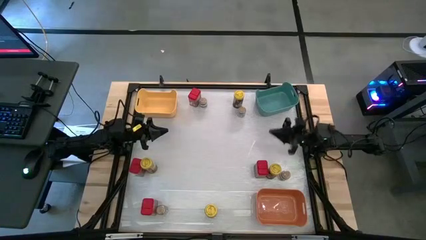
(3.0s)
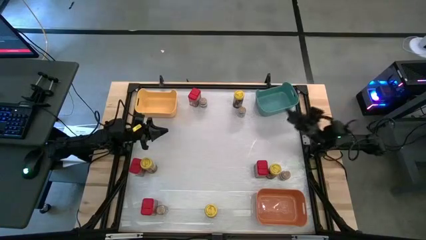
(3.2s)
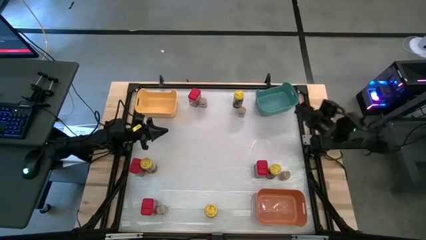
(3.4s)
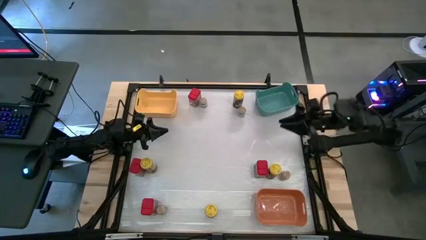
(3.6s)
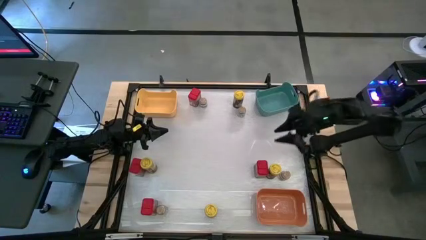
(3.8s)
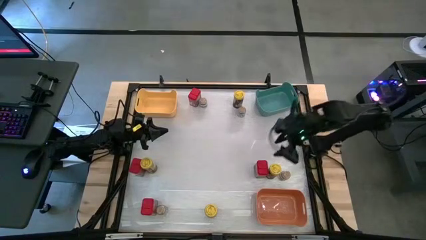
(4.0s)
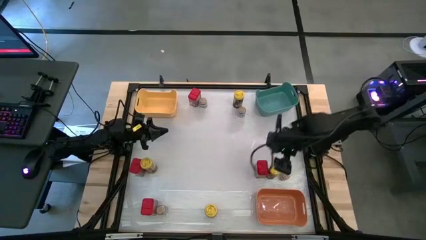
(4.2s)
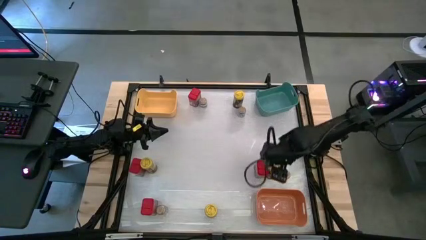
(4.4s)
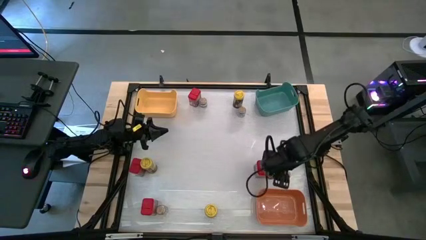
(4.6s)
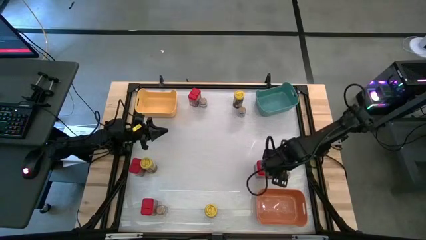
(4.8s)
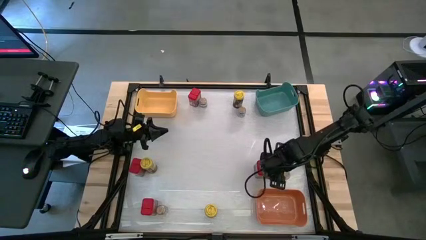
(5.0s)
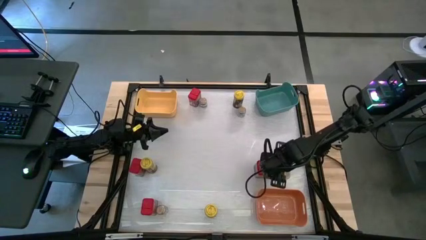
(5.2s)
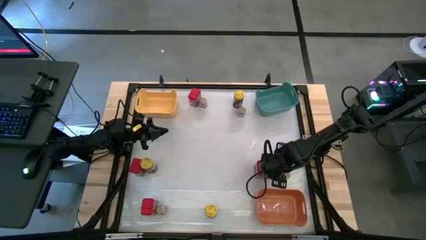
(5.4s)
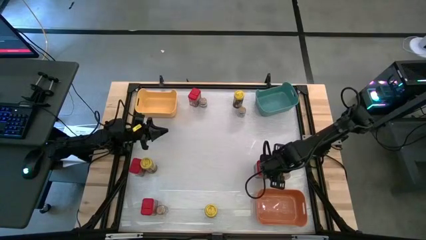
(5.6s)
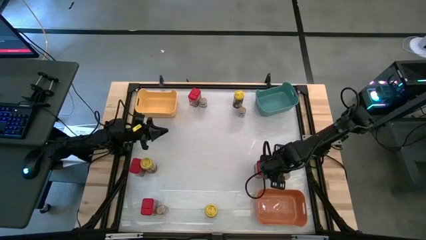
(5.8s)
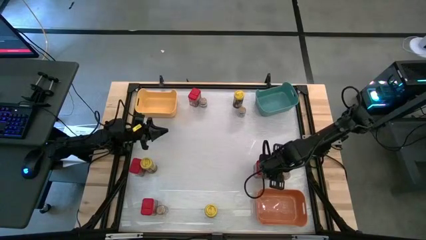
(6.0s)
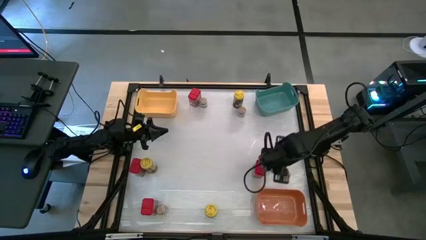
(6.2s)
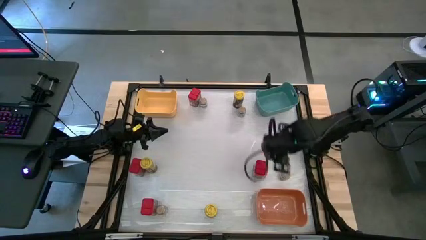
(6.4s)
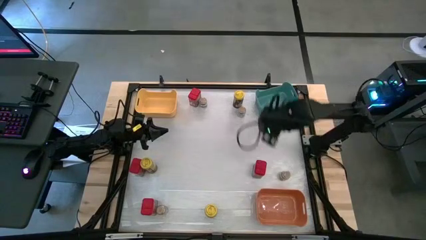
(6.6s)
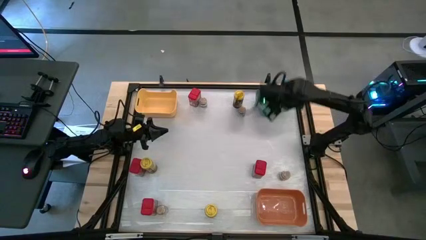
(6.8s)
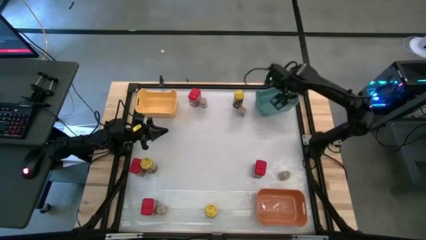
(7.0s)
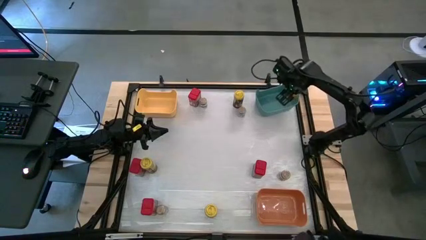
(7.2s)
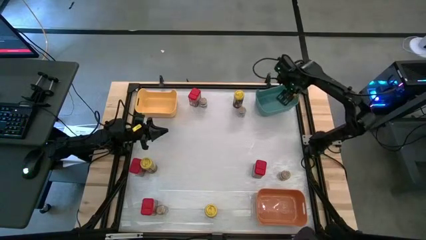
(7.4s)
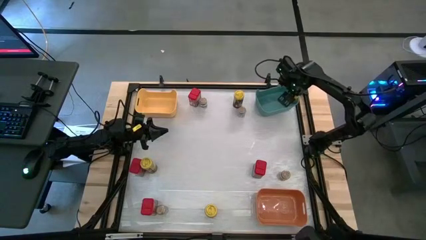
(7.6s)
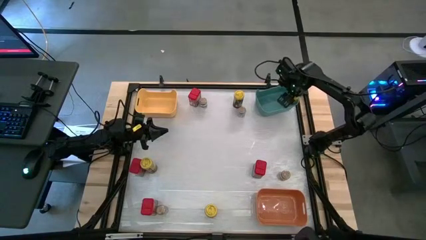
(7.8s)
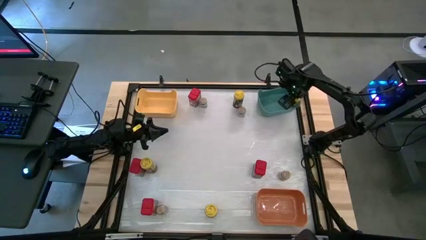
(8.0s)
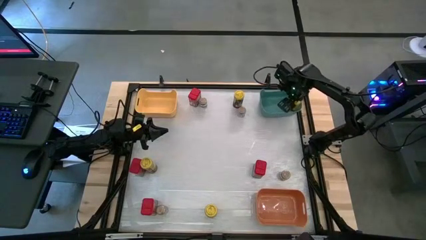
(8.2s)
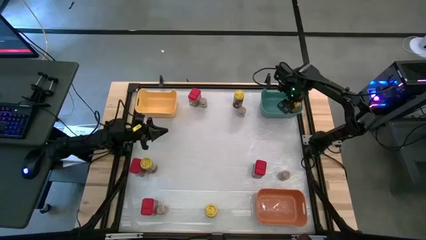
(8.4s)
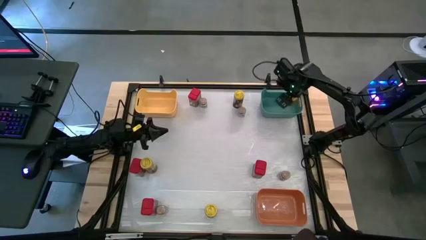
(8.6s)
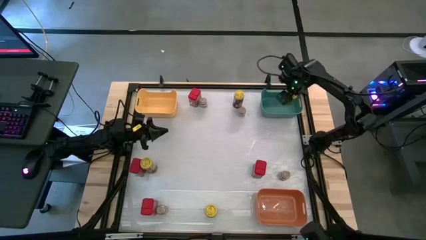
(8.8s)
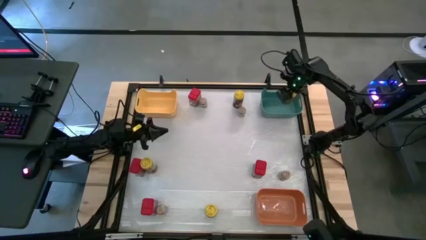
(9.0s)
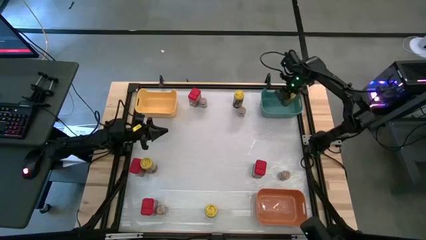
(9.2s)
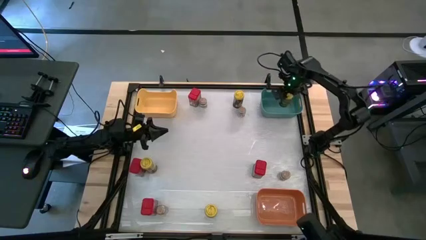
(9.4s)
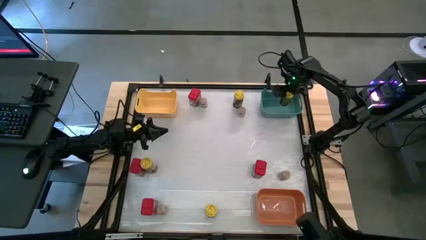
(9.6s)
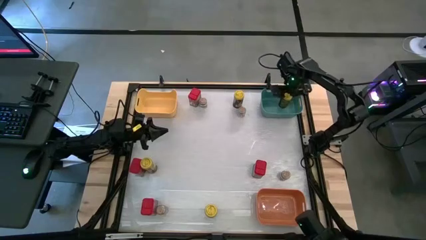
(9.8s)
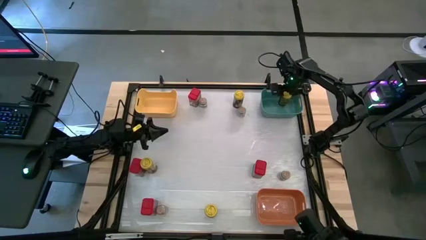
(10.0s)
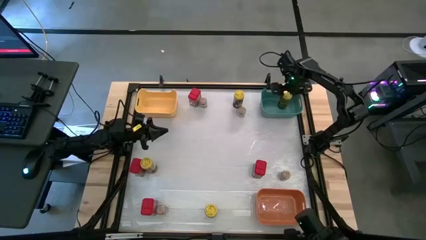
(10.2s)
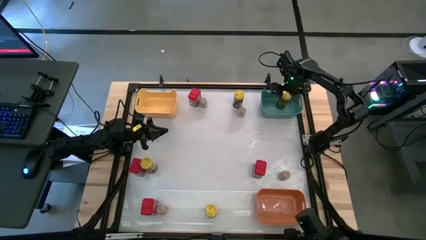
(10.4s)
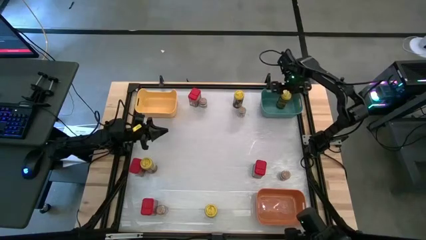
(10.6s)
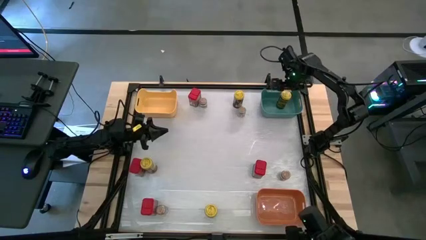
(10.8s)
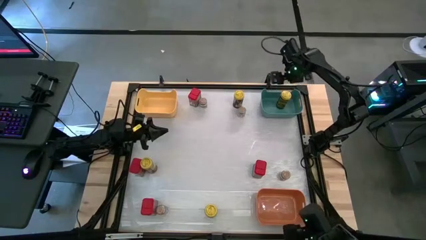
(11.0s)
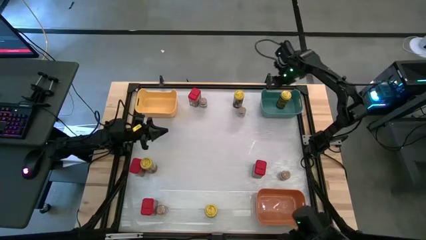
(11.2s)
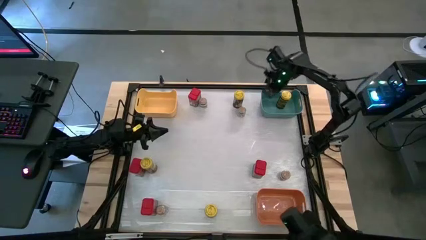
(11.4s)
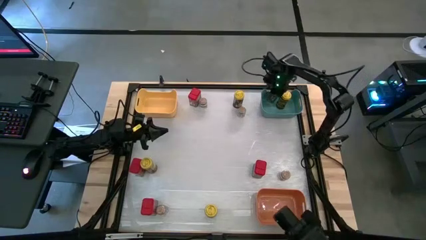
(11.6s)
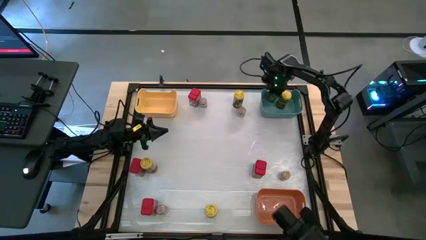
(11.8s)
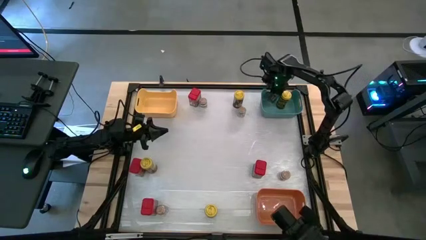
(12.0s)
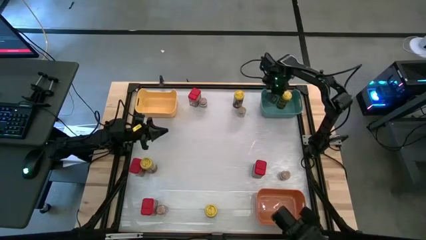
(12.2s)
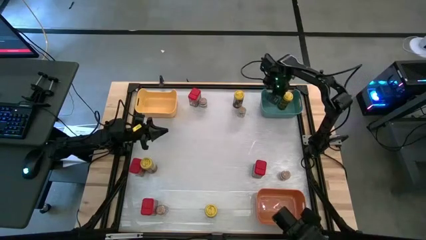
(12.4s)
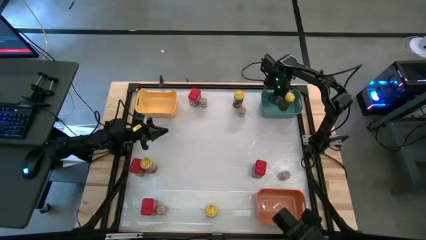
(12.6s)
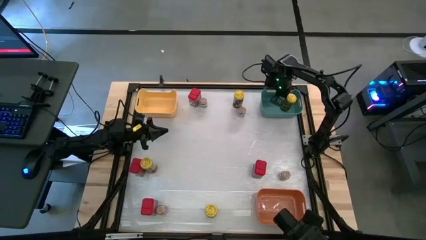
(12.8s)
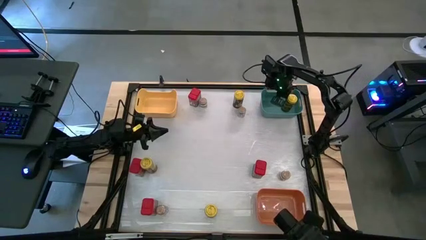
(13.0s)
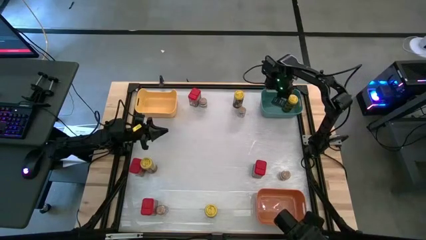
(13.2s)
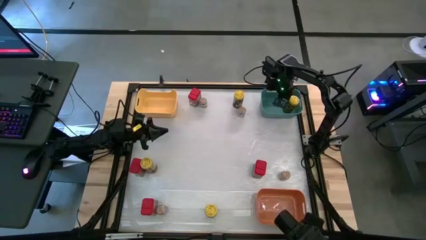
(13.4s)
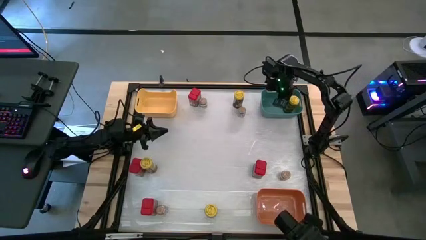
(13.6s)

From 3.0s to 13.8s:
Task: Sort spices by type
Put the middle right yellow seasoning bottle into the green bin

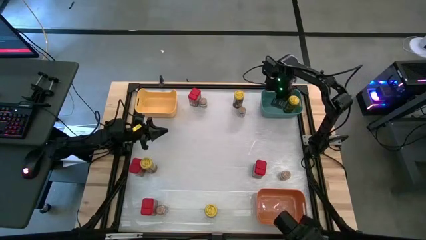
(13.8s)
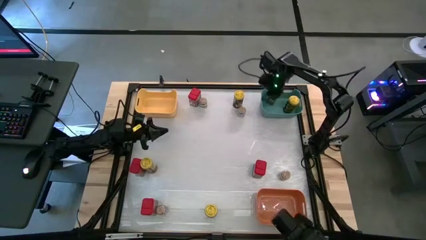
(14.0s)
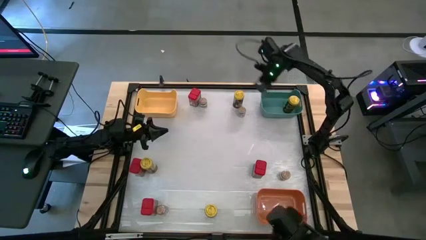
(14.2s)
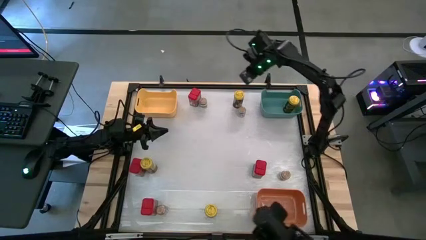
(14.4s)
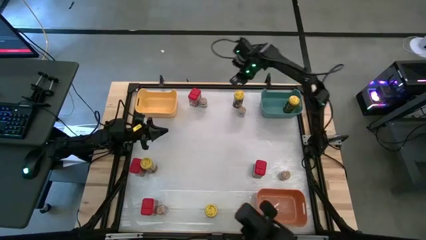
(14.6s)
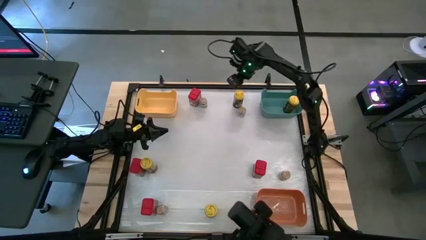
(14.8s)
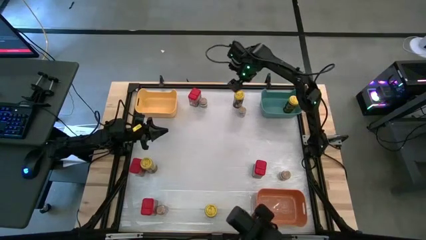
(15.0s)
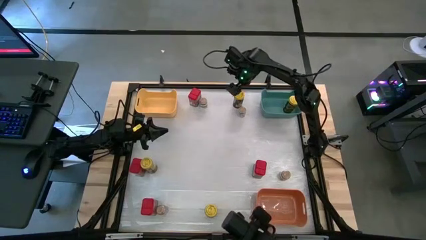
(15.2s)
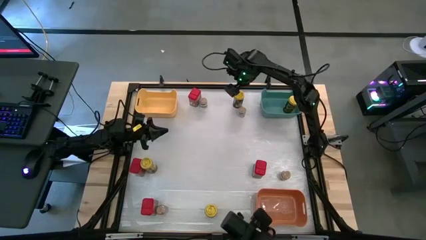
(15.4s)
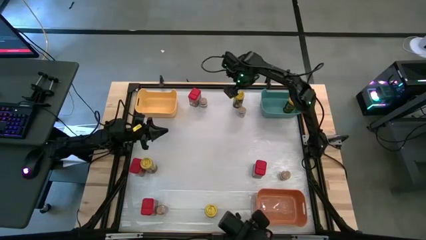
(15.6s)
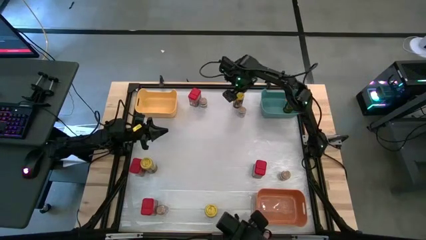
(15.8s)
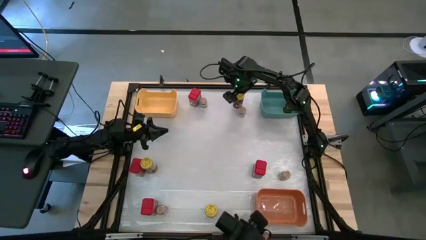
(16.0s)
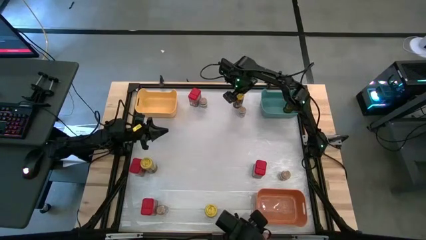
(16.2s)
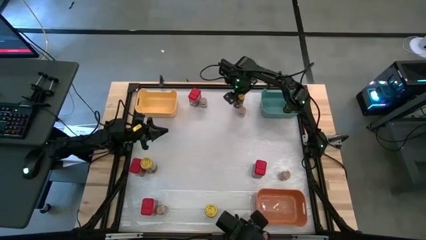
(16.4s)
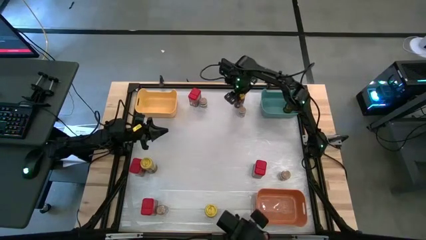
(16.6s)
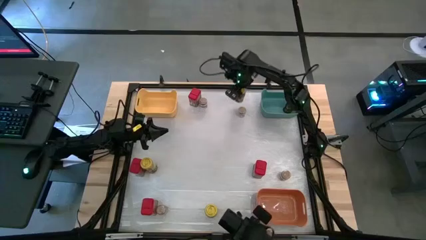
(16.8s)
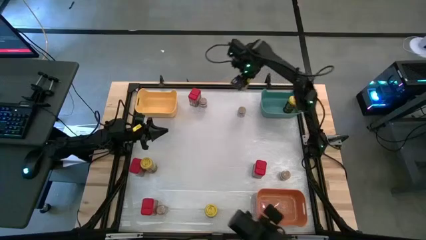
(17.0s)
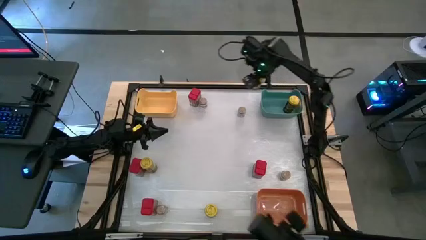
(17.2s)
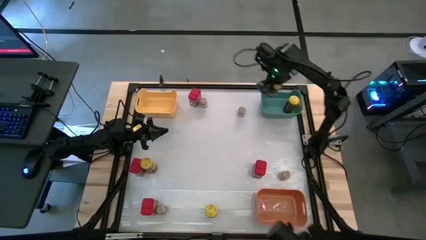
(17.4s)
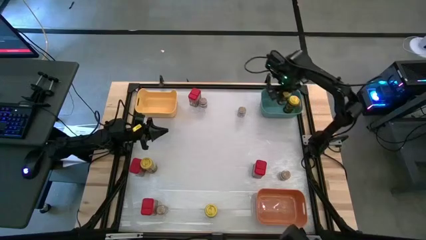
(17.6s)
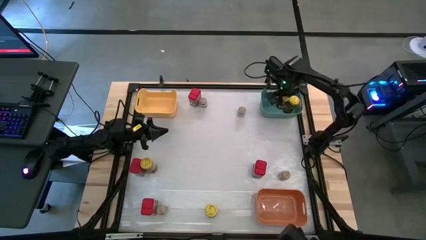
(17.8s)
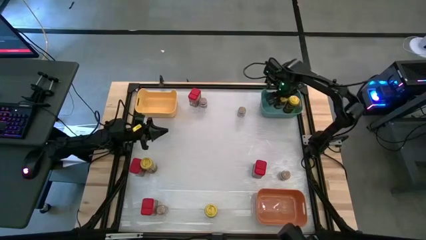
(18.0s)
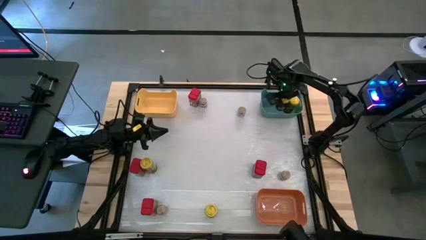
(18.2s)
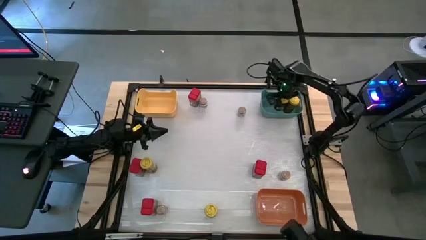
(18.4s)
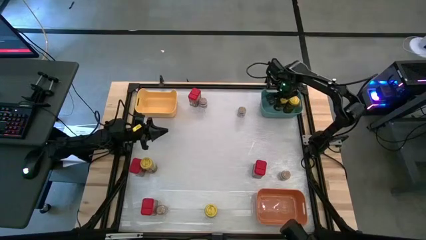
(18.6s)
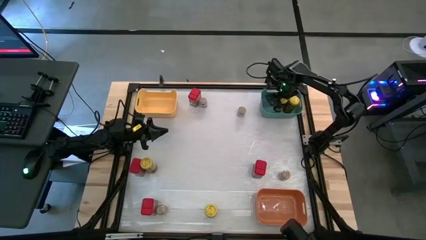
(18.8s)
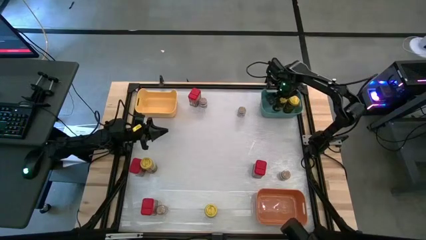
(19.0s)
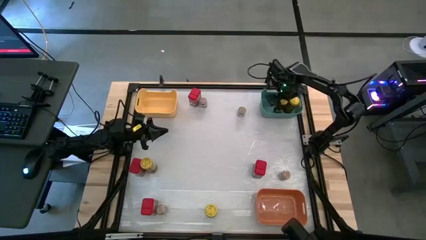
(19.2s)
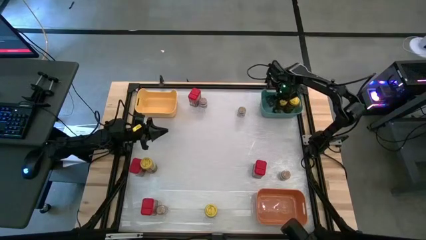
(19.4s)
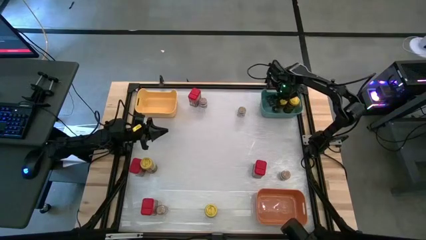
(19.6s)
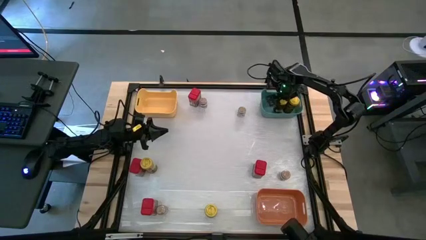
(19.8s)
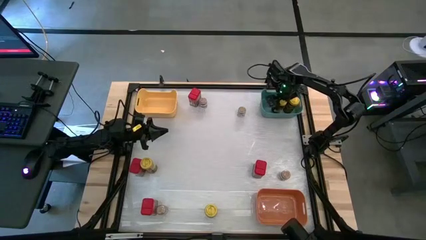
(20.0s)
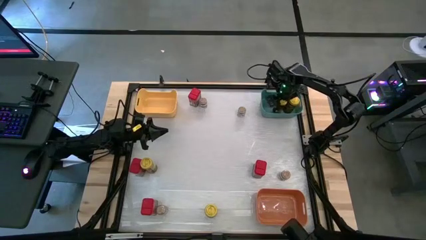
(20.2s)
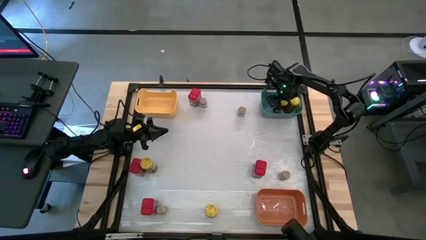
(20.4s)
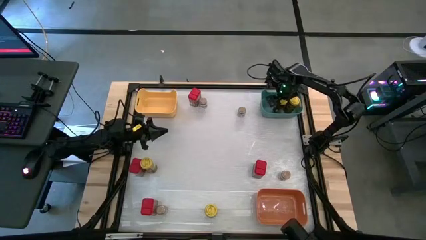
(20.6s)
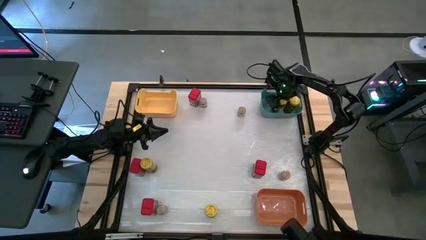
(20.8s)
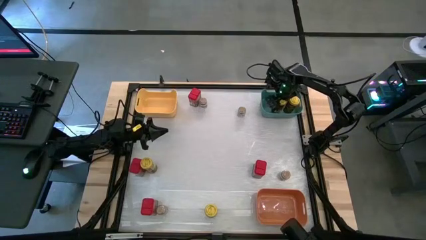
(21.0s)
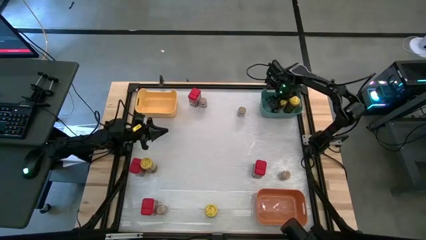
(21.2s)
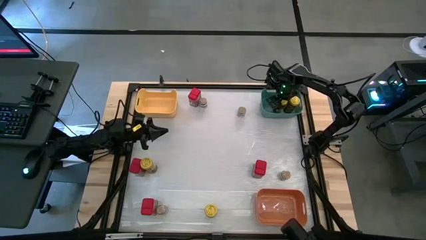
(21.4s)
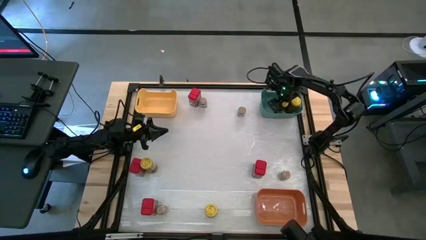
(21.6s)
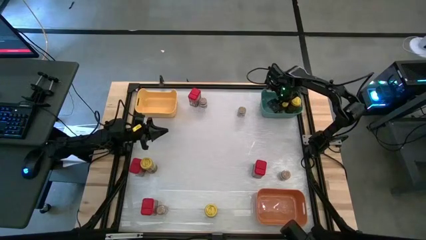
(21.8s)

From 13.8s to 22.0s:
Put the top yellow seasoning bottle into the green bin
